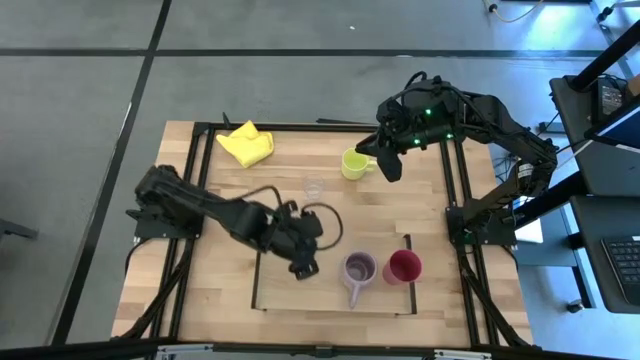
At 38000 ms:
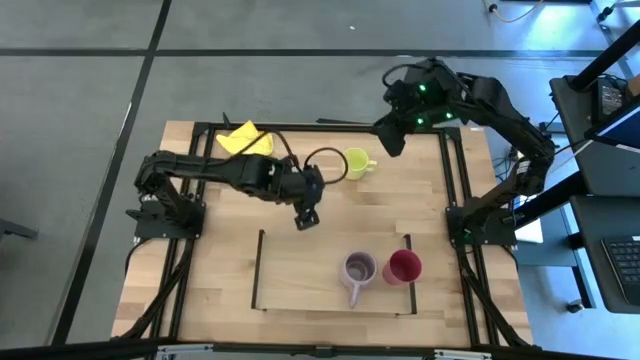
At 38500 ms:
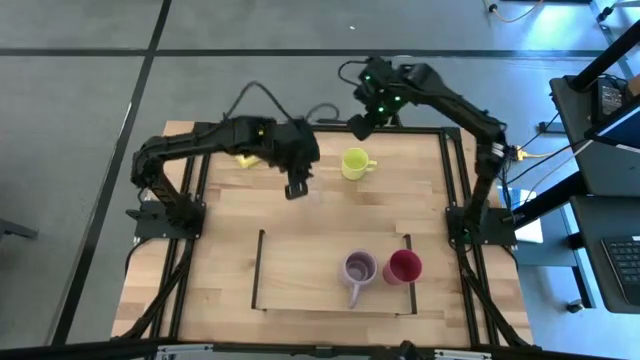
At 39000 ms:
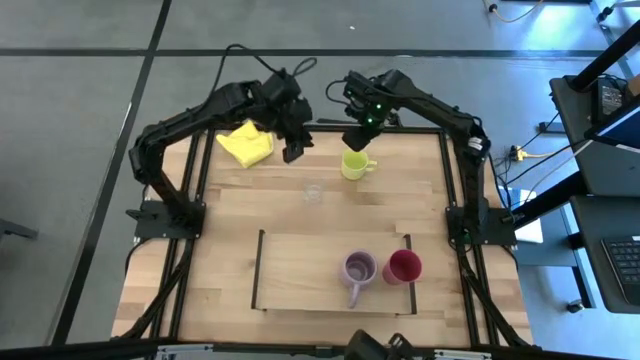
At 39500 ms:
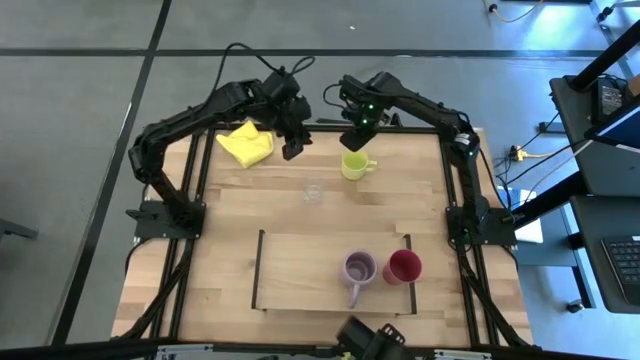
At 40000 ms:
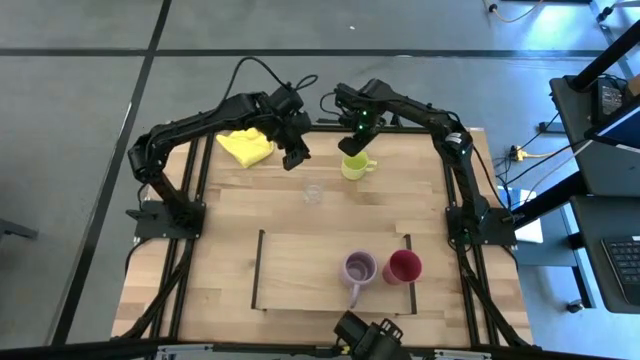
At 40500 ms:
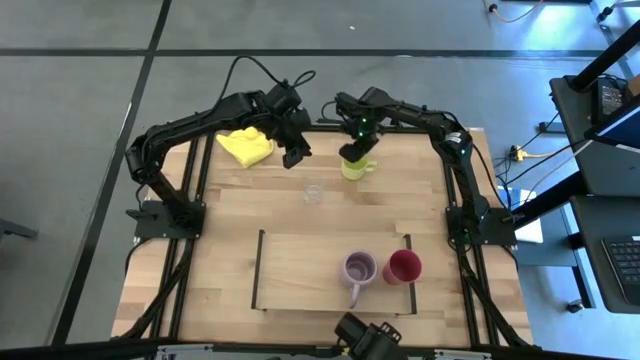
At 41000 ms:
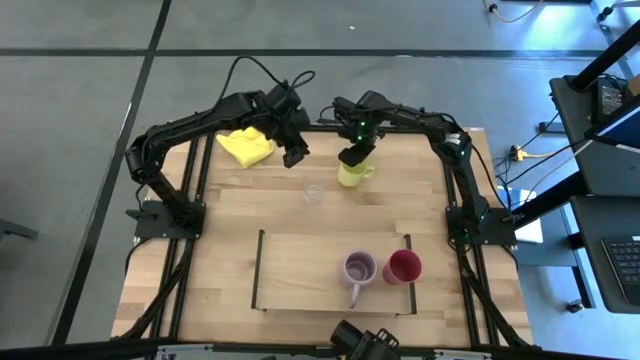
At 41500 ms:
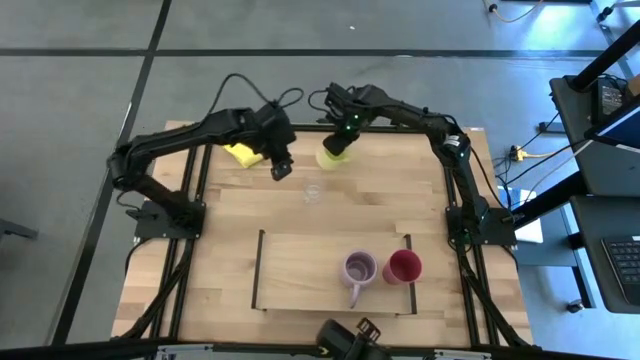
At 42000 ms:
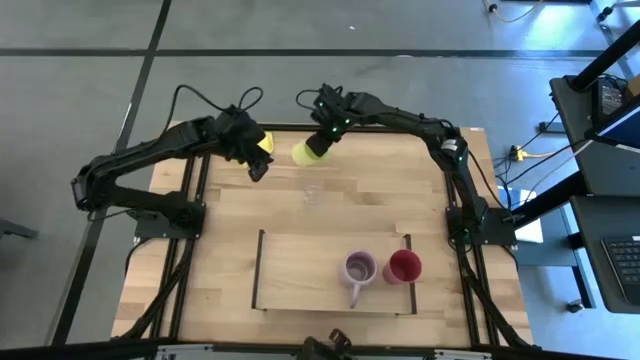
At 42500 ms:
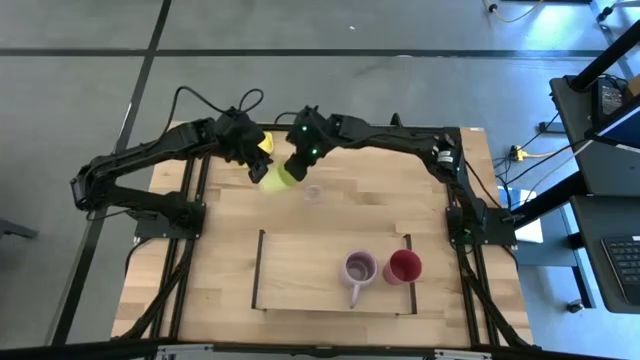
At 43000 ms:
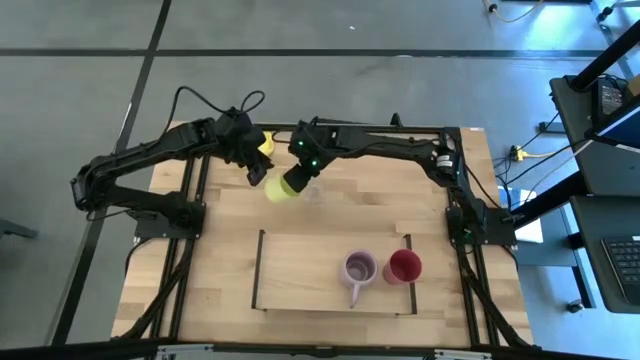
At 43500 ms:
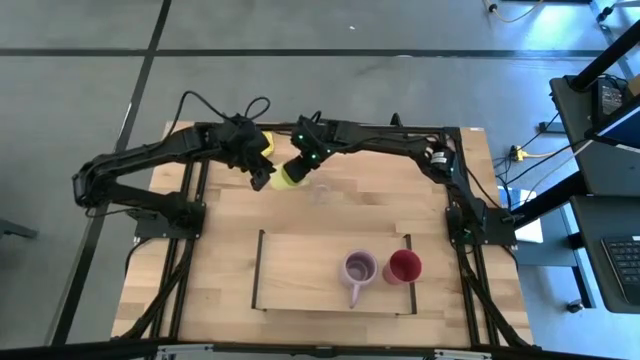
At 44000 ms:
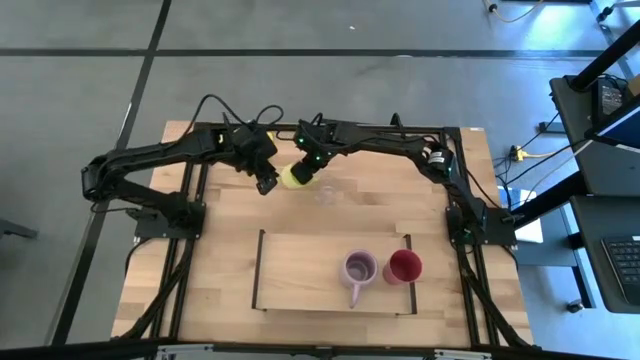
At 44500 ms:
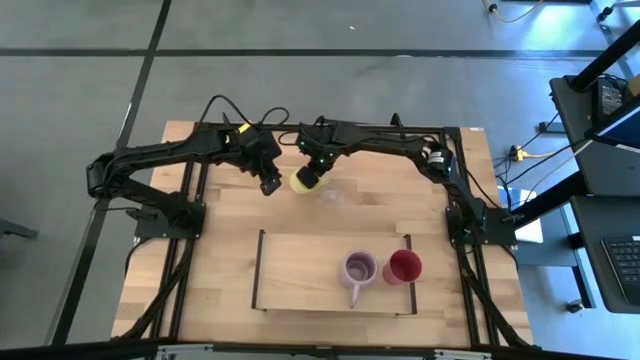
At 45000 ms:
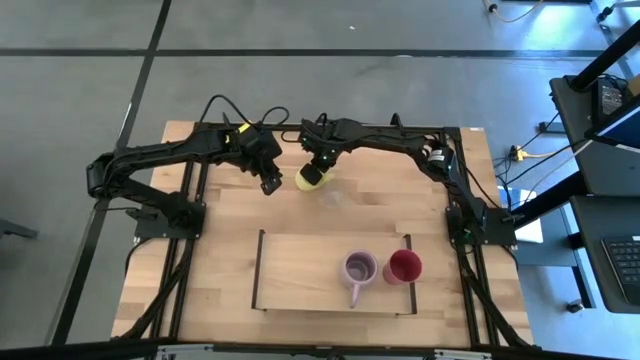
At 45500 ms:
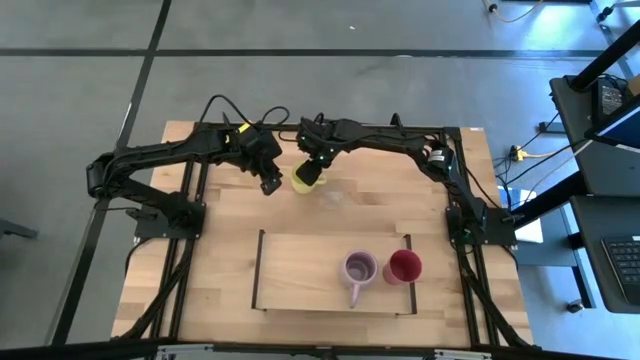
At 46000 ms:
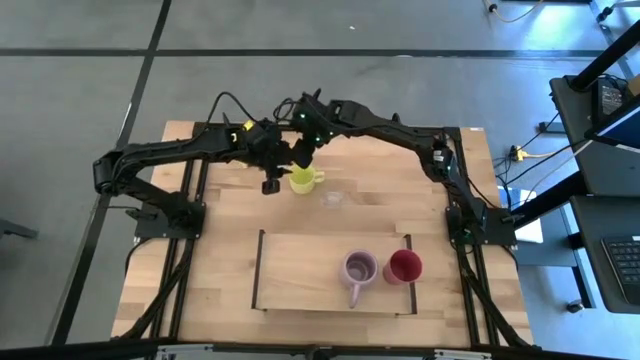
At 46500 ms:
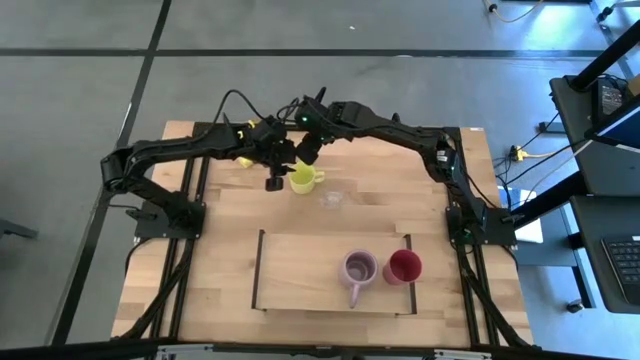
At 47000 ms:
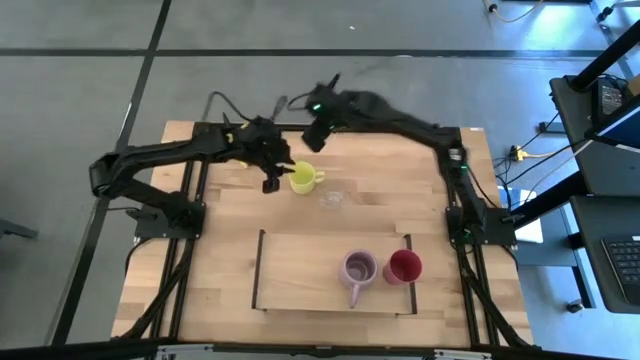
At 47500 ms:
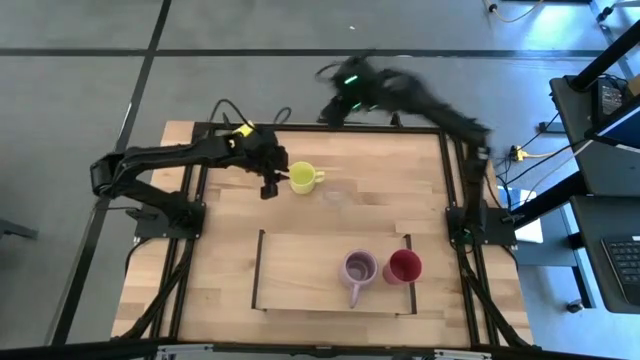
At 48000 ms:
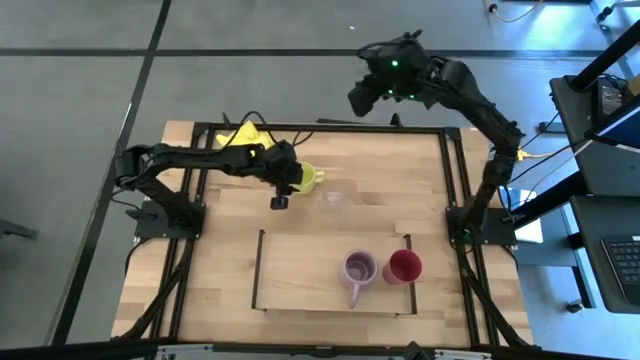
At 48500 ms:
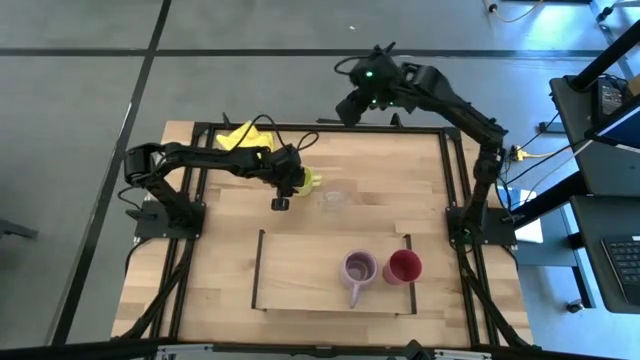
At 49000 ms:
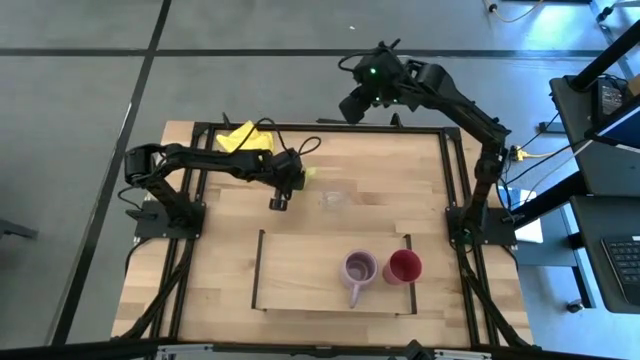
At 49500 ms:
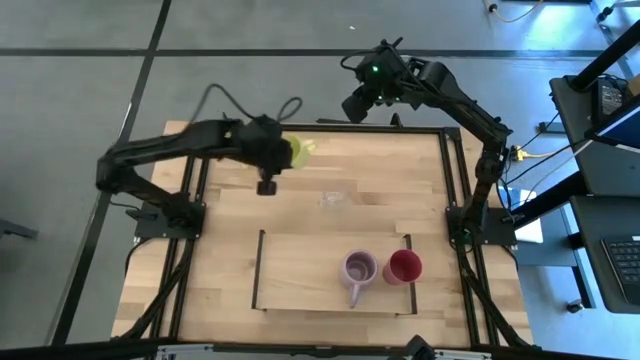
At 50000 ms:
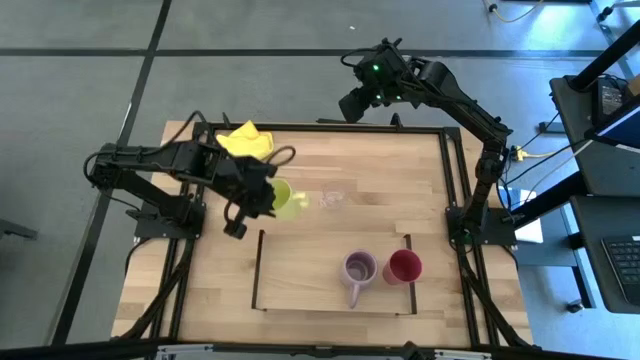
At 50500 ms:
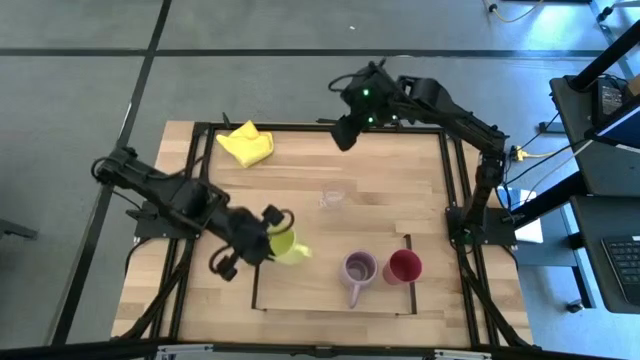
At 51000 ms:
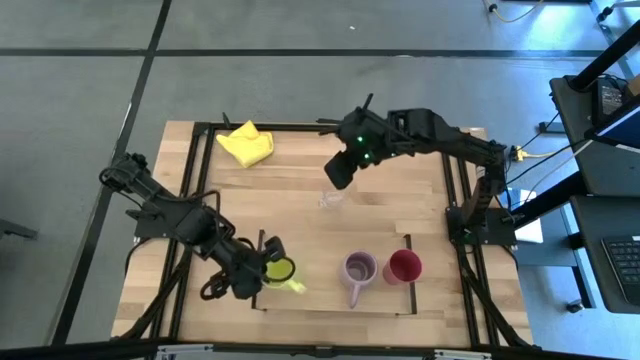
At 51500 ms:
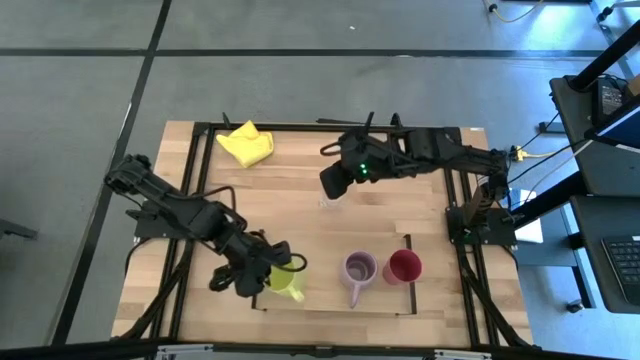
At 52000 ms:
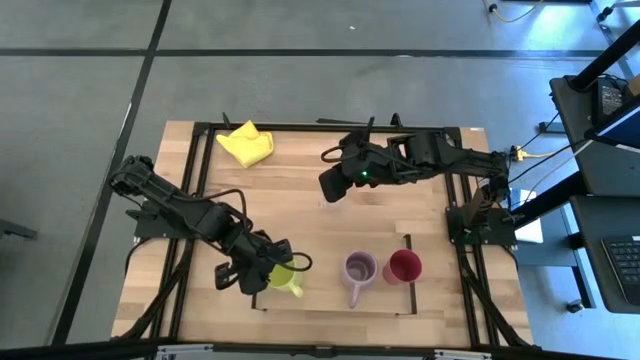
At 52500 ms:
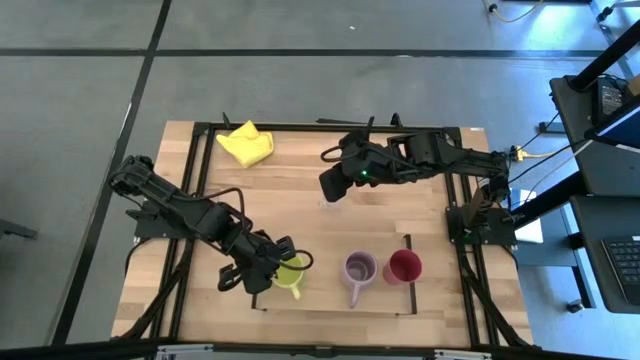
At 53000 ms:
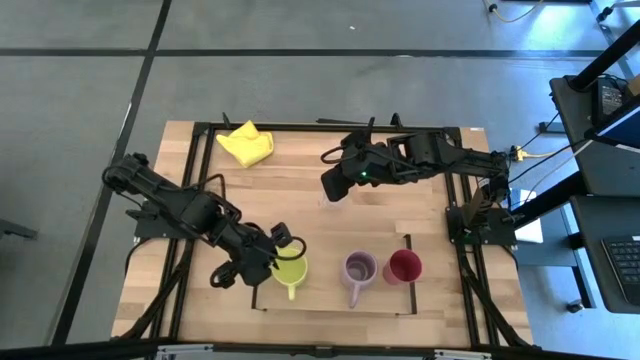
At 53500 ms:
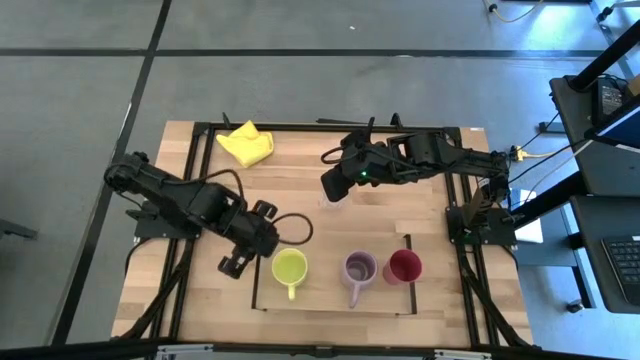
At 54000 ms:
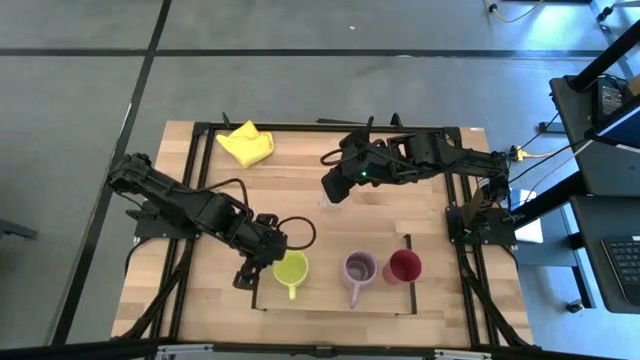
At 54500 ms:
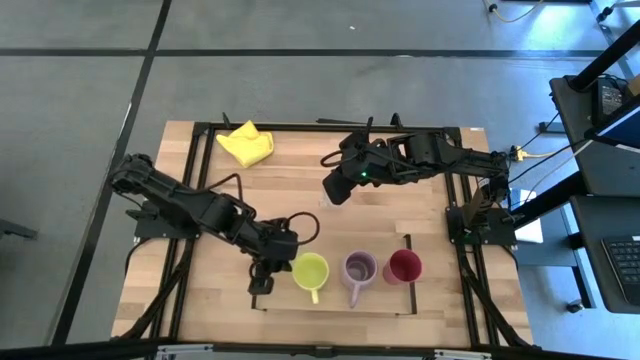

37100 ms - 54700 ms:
Task: Stack small to large cups/mugs on shelf
Put the yellow mug on the shelf
